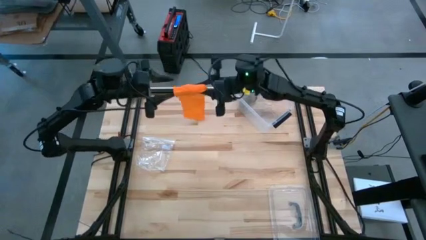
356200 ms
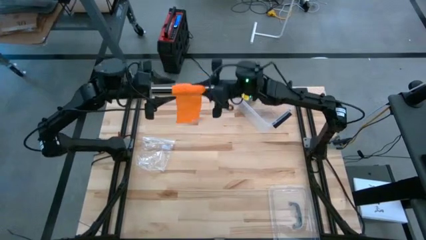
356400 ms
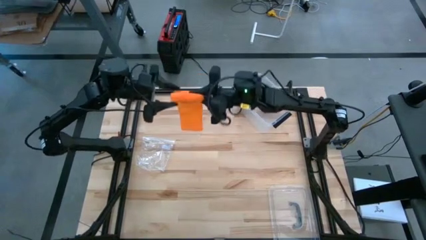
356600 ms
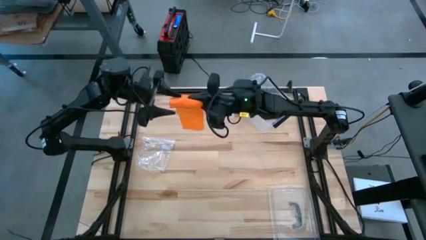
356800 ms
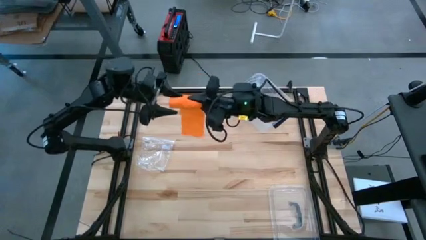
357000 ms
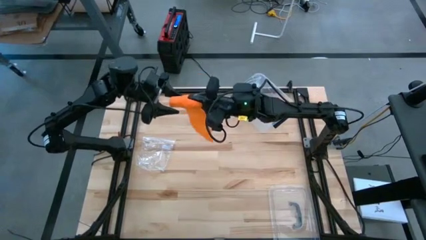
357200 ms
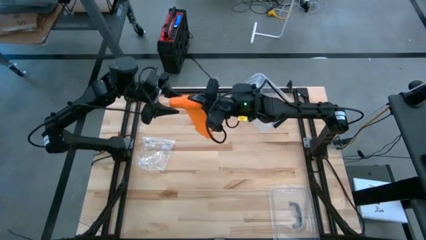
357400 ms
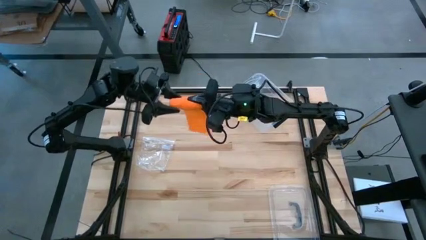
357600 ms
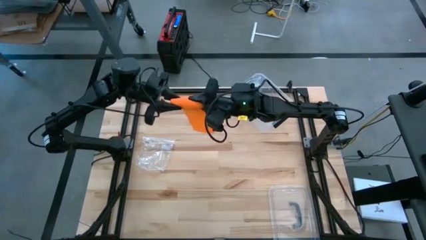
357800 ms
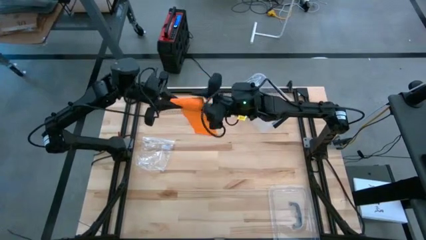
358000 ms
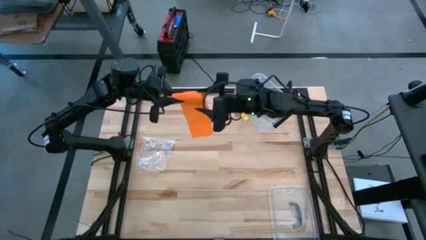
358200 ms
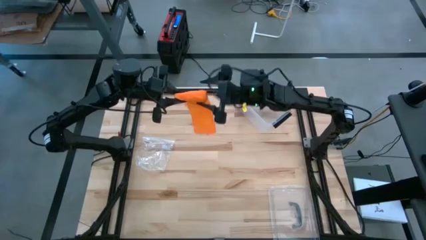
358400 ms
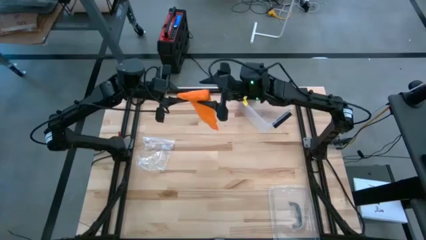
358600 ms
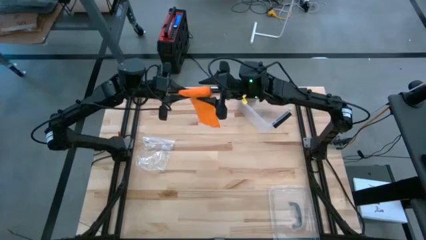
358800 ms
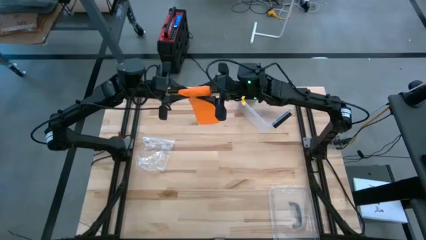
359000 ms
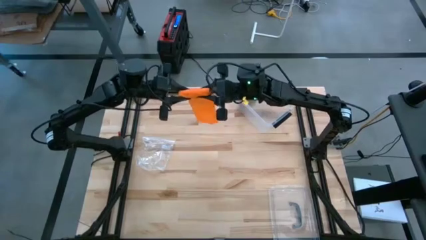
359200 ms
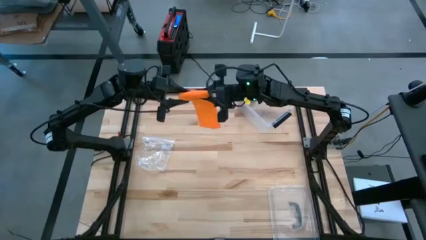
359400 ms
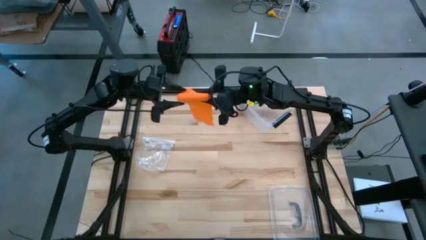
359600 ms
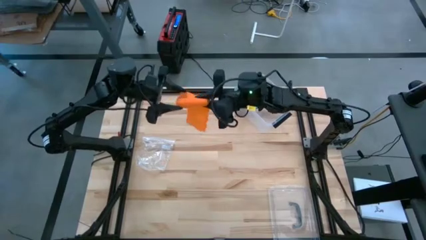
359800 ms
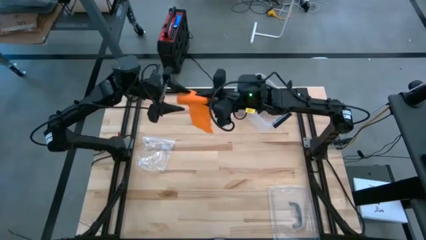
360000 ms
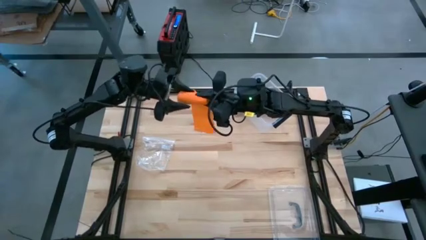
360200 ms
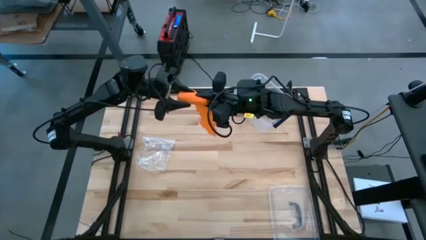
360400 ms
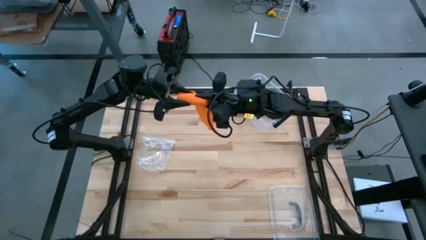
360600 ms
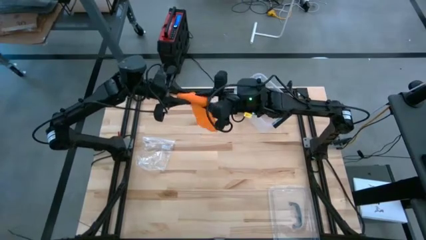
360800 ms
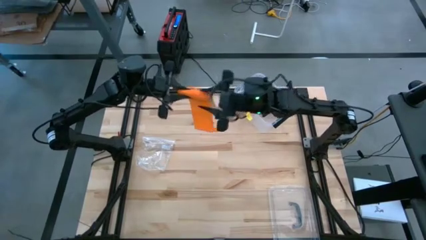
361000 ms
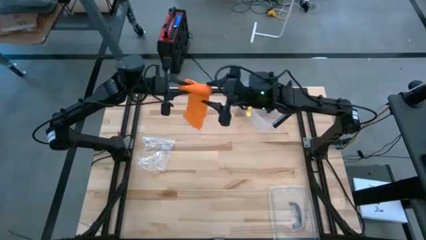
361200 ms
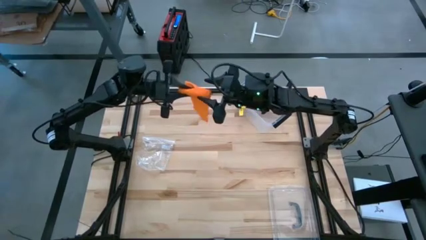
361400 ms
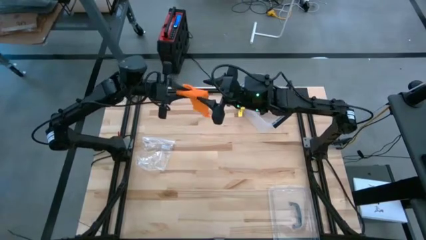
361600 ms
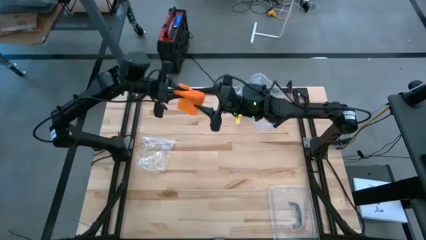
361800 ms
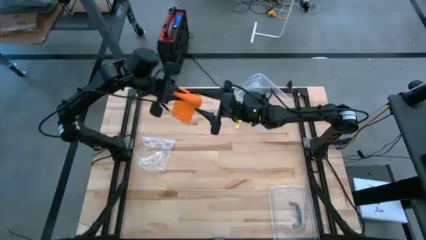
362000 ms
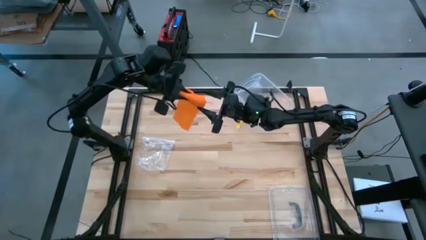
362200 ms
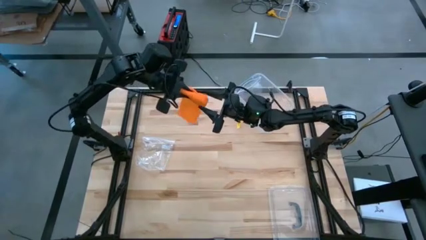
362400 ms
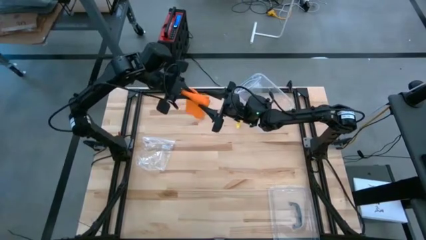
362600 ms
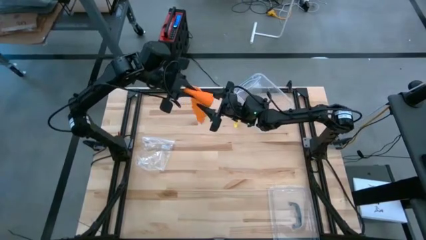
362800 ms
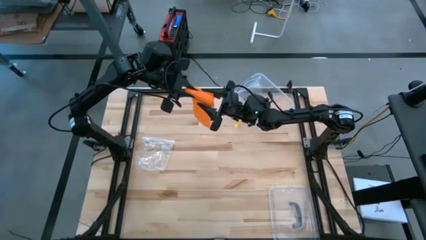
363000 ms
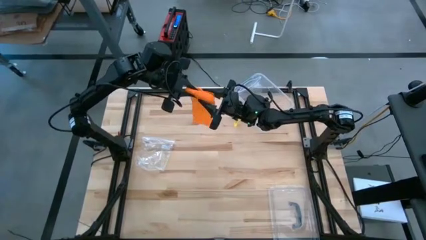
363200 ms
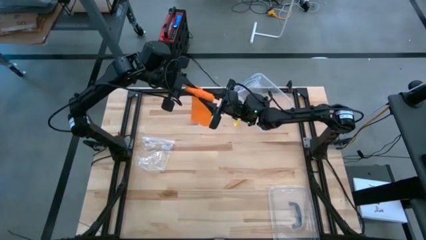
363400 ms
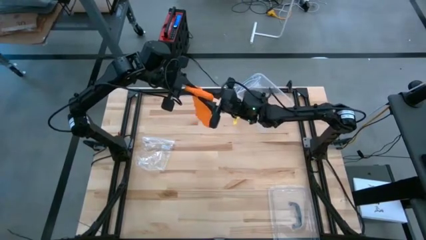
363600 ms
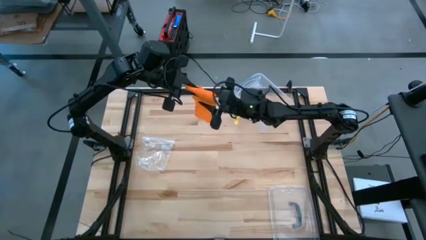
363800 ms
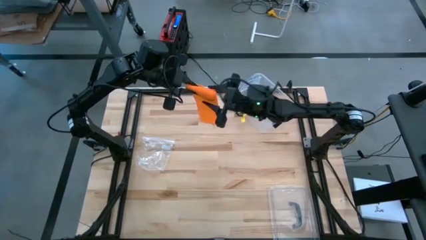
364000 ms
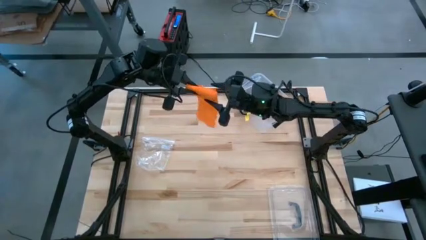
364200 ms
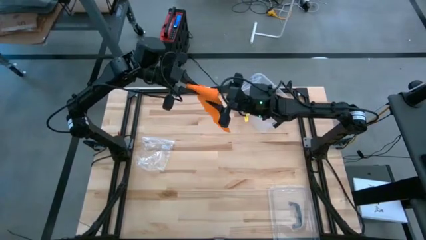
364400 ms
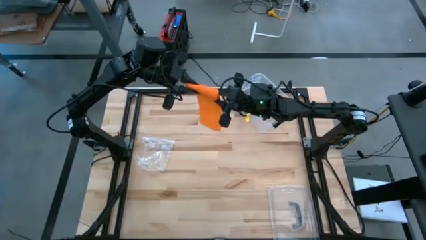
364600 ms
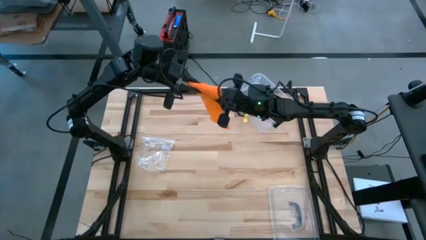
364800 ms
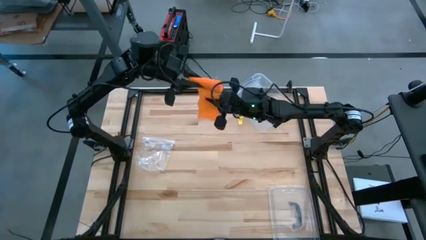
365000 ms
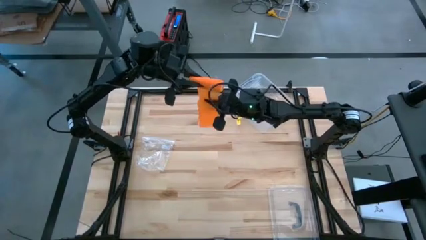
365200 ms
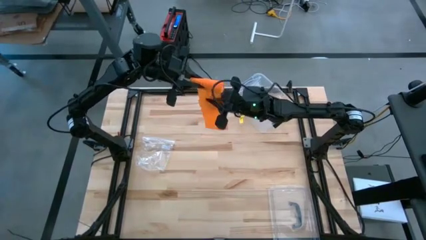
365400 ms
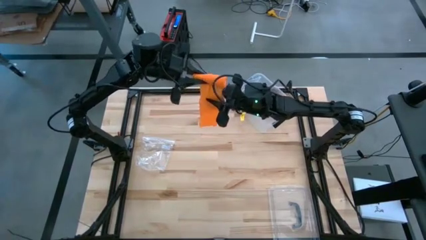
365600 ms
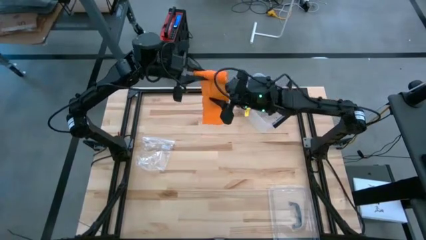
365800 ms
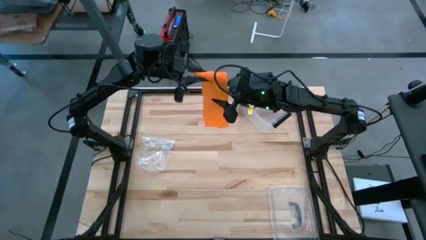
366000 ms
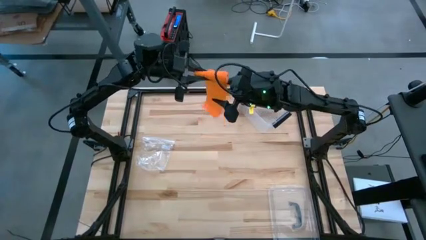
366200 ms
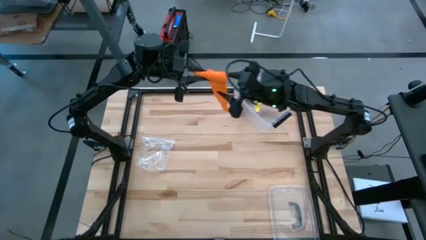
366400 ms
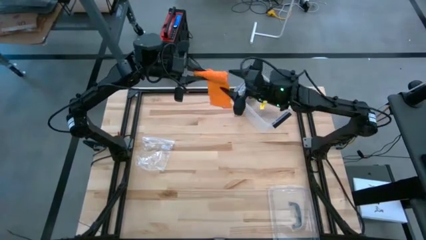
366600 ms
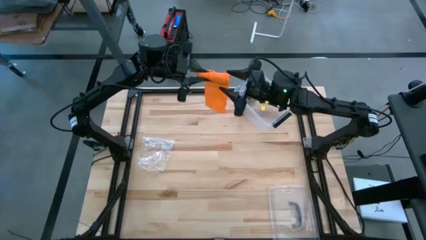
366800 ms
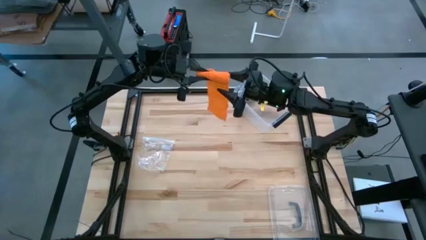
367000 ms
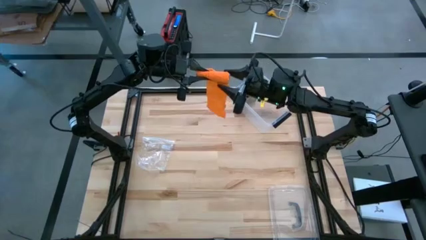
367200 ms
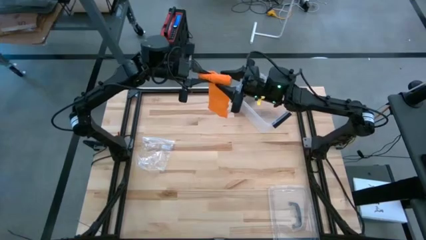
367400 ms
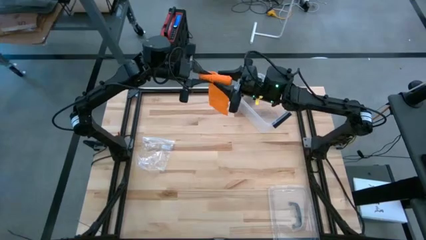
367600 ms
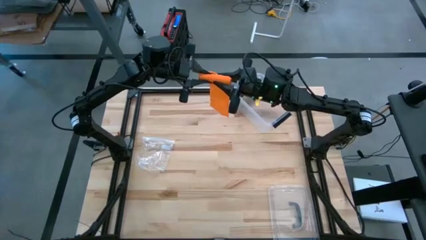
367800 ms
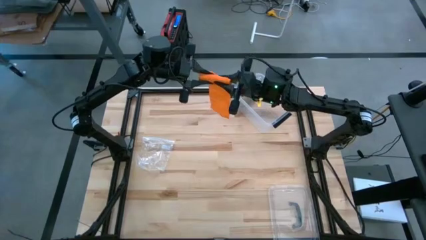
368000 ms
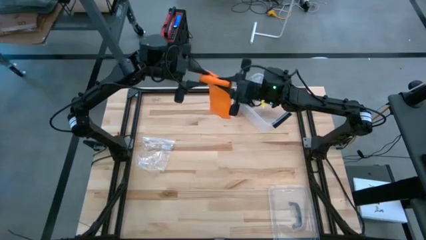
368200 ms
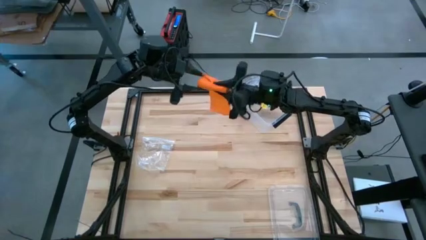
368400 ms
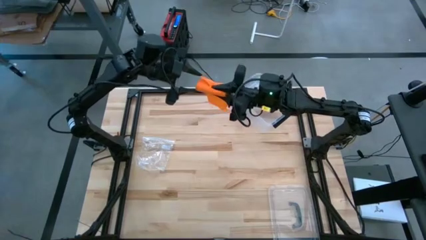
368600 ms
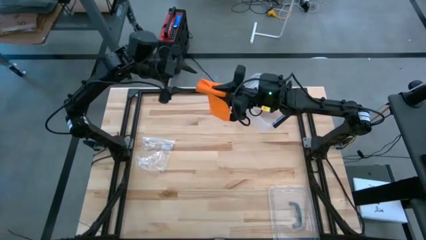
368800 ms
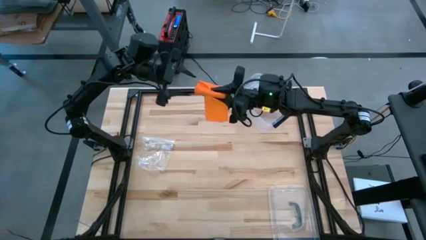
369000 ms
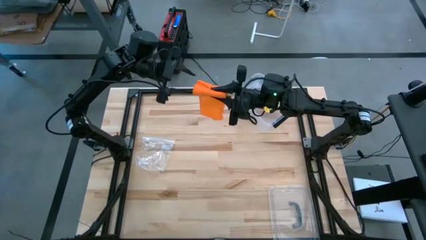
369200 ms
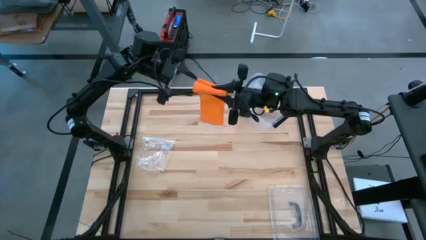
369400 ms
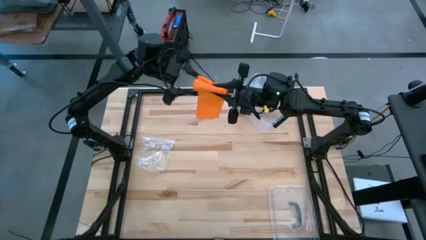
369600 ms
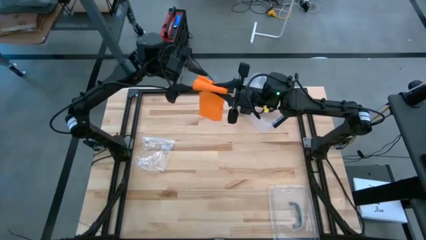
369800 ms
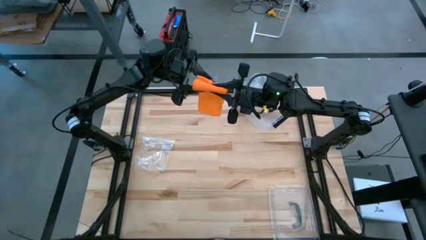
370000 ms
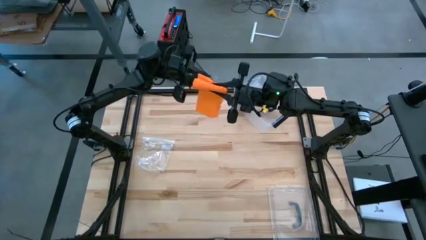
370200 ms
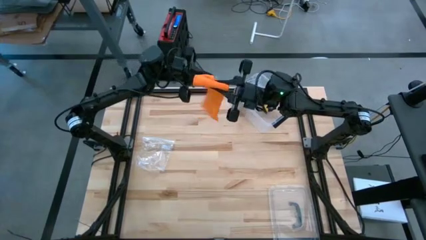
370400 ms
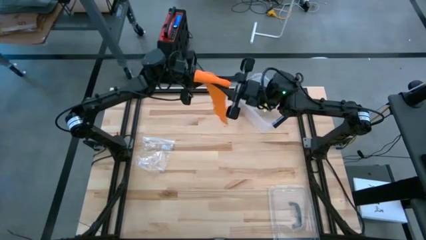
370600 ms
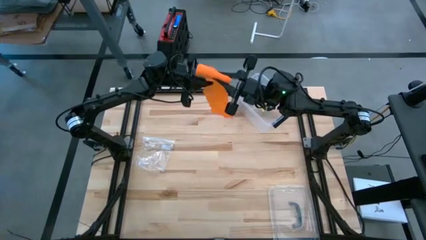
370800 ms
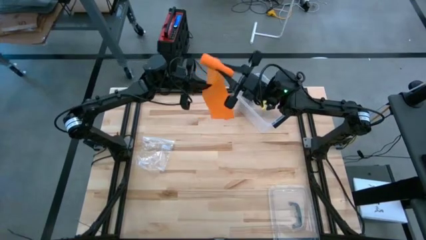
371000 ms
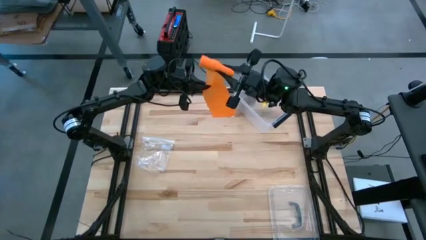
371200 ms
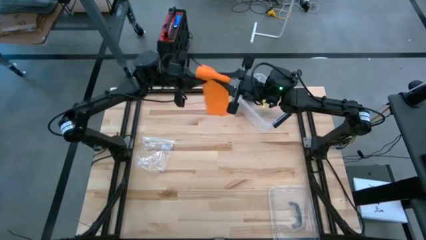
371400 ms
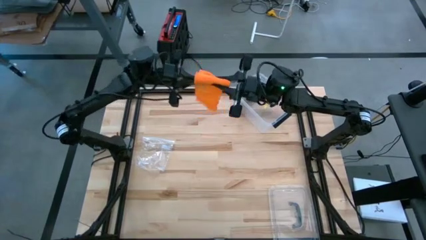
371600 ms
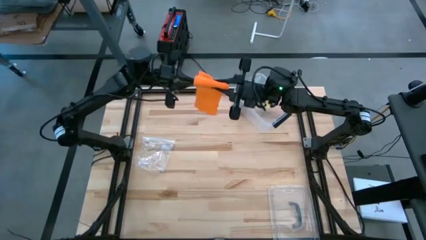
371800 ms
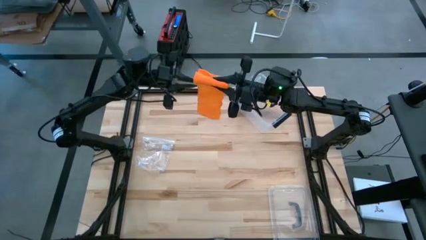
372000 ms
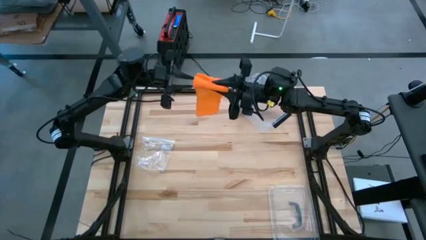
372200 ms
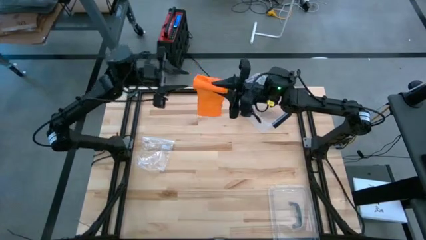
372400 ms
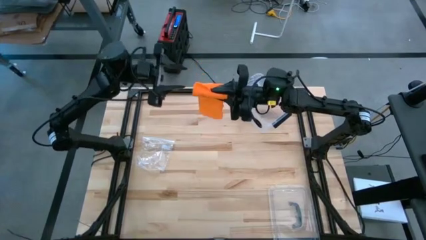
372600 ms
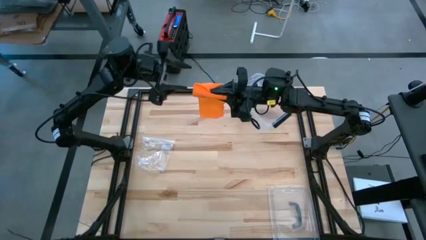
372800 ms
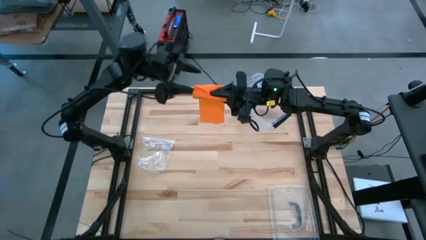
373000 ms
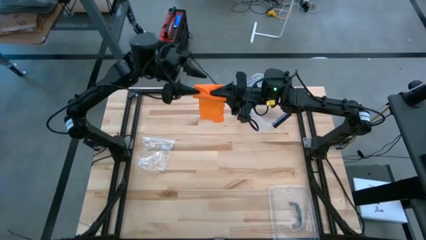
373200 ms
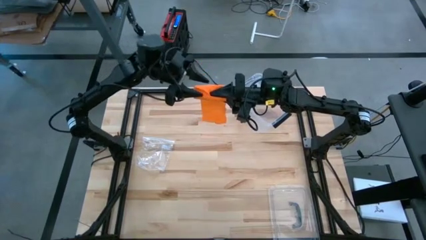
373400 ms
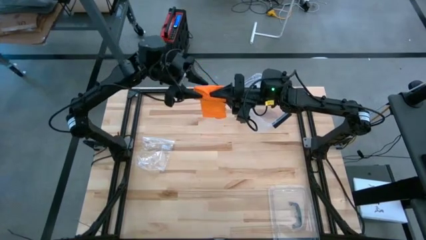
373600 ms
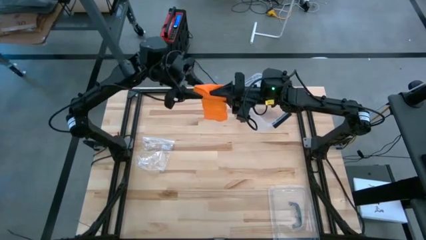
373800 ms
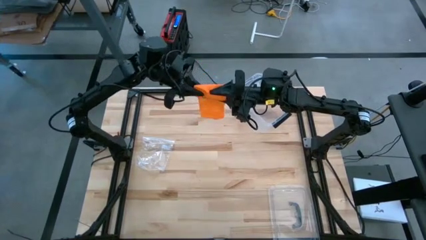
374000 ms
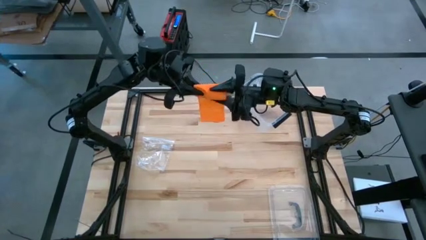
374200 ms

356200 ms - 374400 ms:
Task: Roll bandage
Roll the orange bandage on the table
